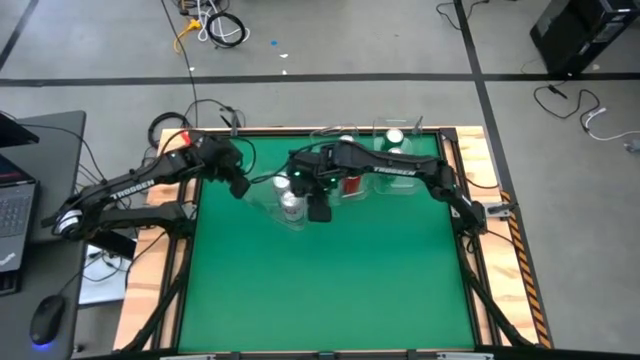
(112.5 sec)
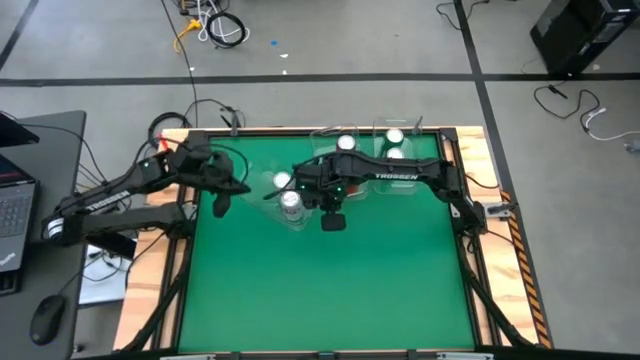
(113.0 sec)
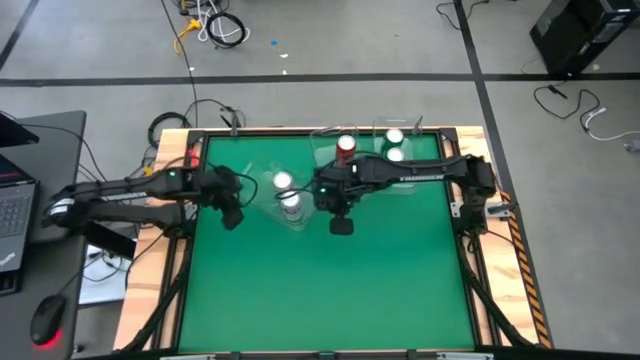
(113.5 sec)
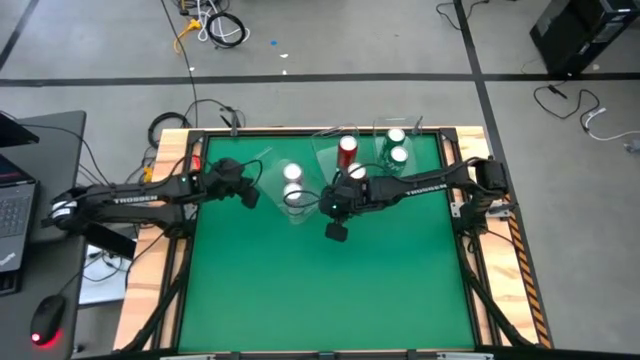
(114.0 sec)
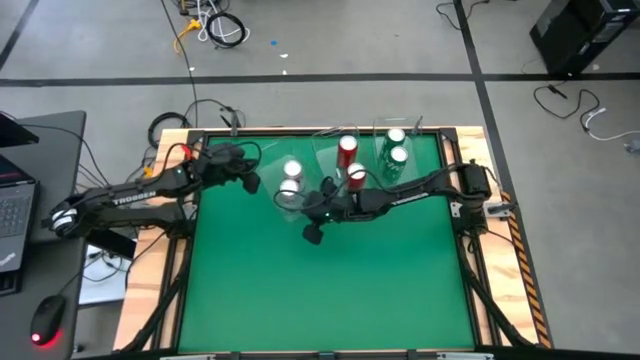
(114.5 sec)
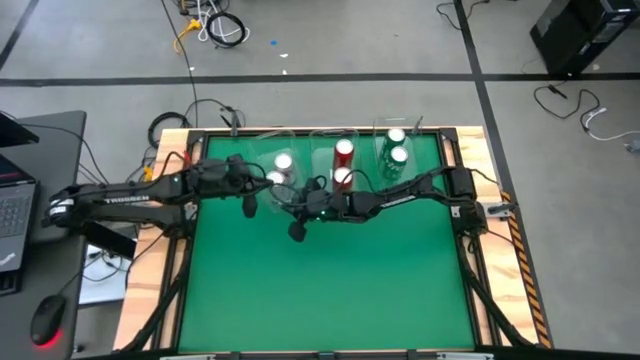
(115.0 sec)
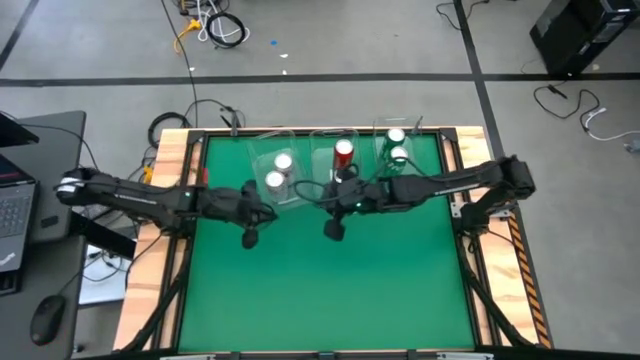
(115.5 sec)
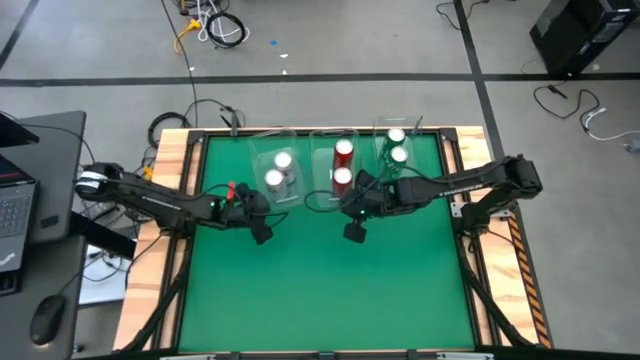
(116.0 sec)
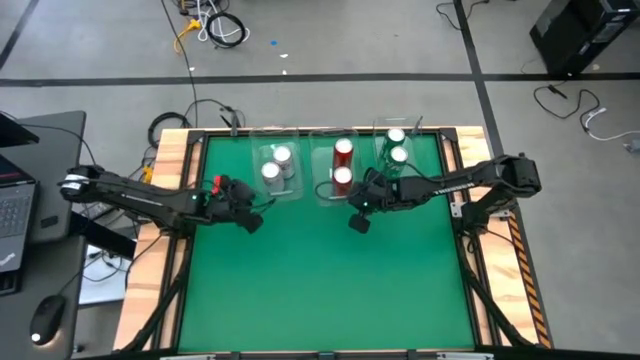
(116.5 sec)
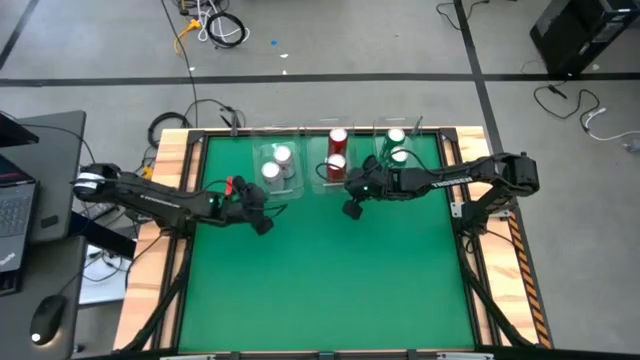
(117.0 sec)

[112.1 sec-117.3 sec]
Task: Sort soda cans
Adjust the transparent bins

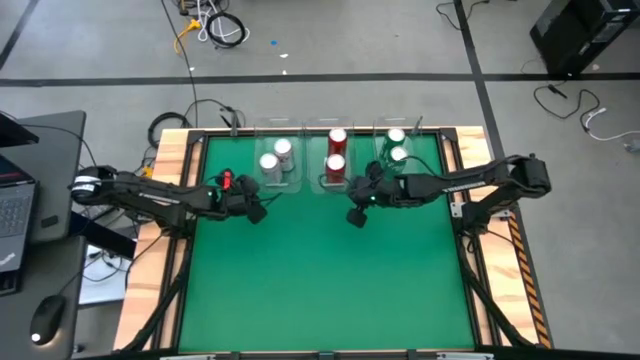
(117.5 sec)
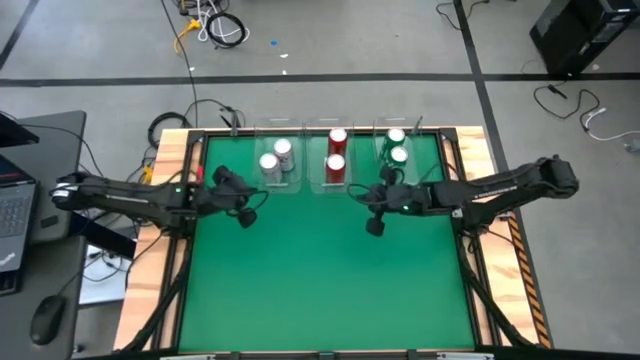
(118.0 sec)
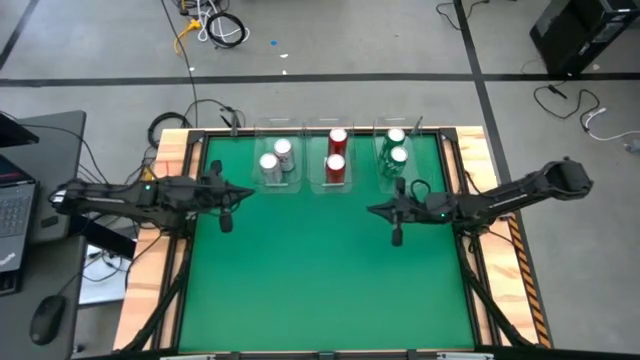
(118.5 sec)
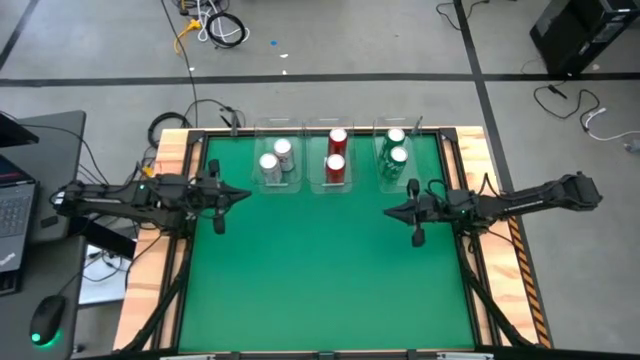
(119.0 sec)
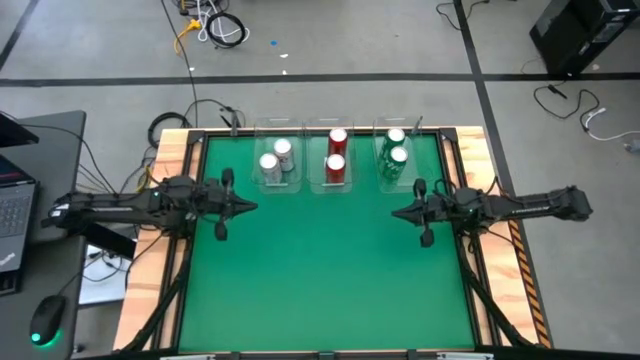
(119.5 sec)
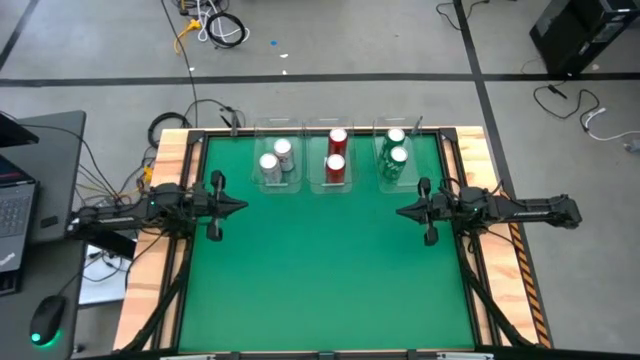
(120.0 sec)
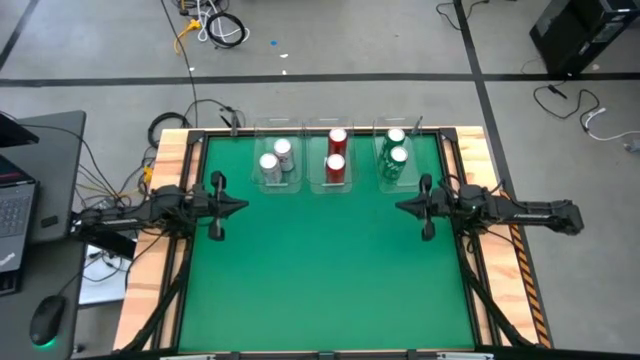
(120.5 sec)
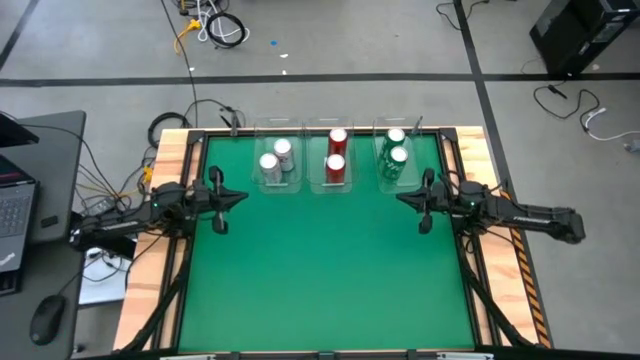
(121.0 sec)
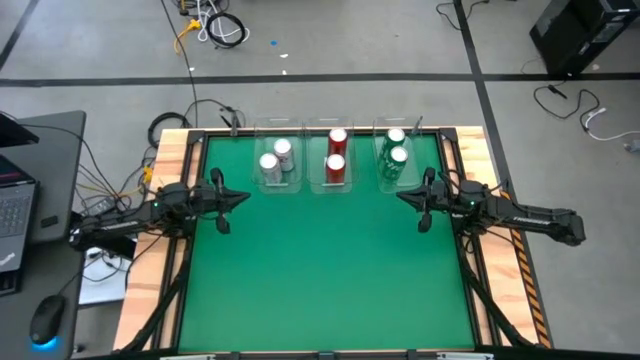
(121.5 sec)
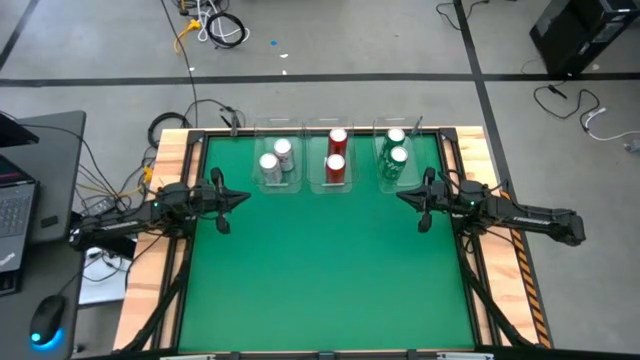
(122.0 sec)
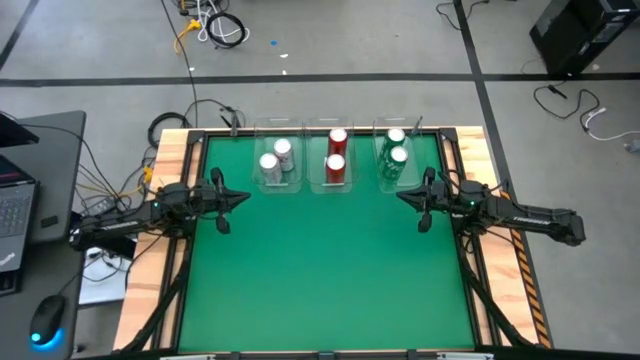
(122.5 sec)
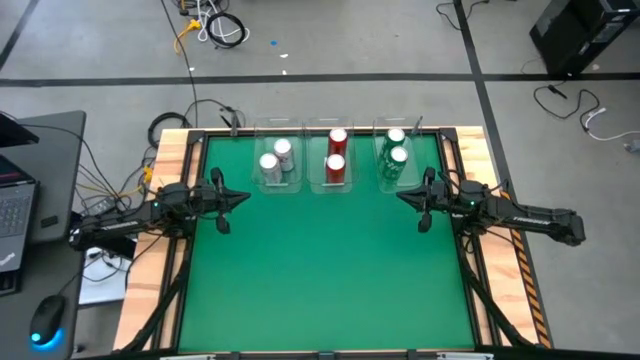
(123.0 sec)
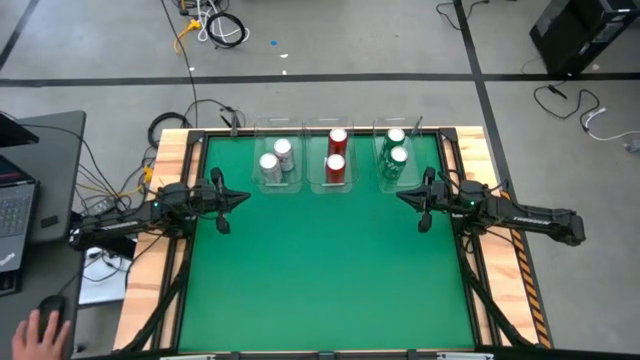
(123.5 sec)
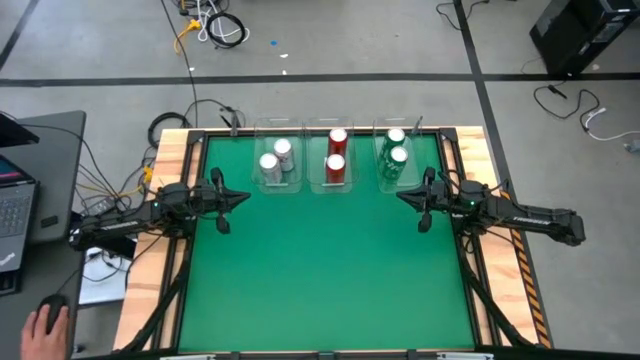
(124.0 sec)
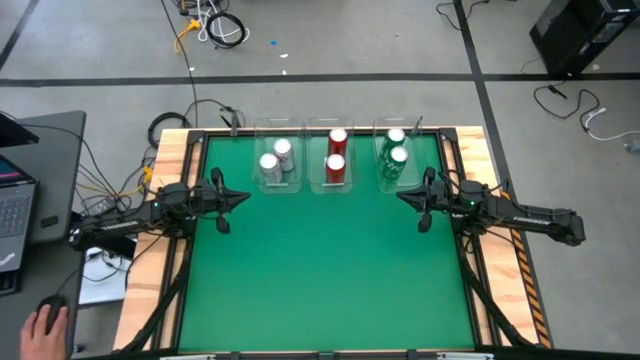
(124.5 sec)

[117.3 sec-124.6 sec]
Return to Home Position

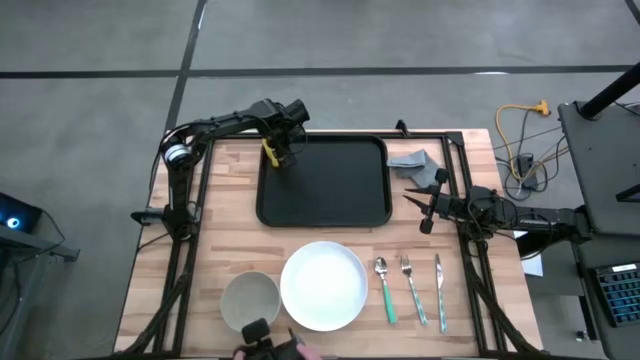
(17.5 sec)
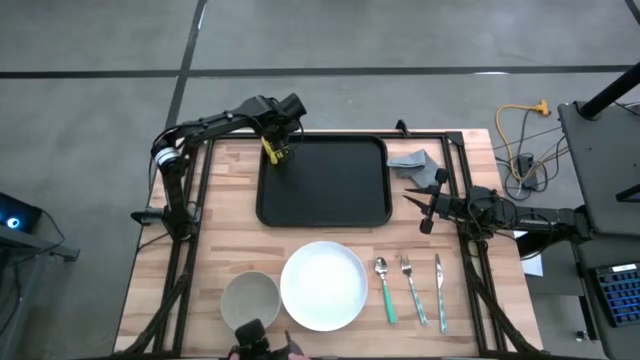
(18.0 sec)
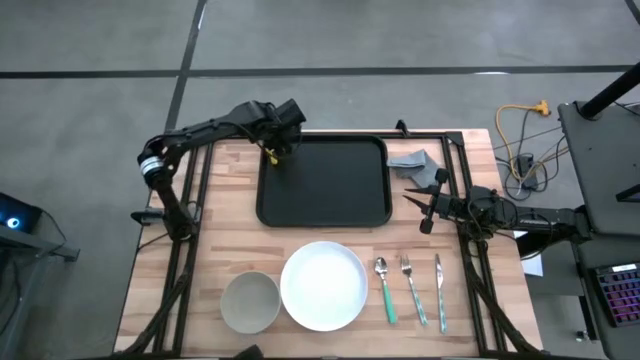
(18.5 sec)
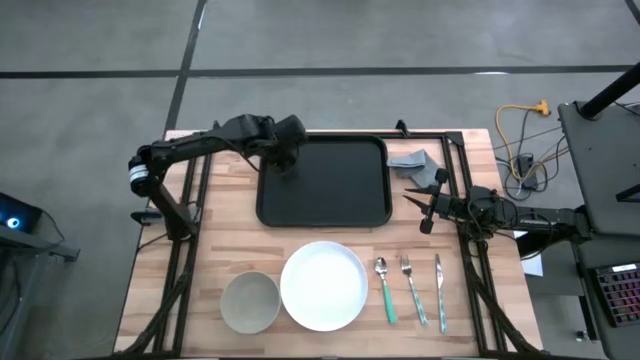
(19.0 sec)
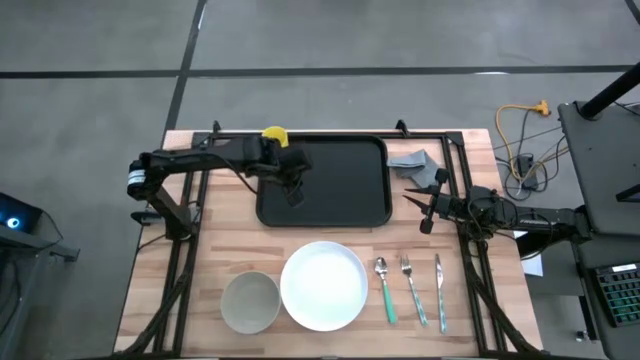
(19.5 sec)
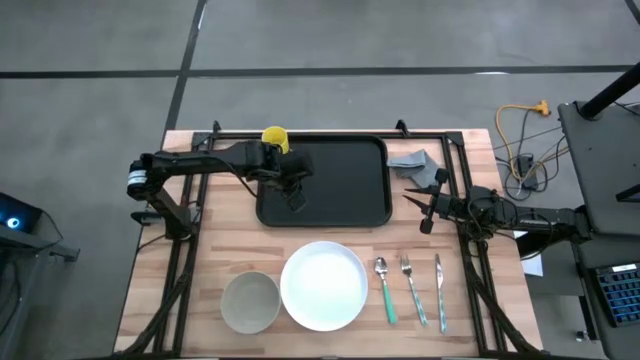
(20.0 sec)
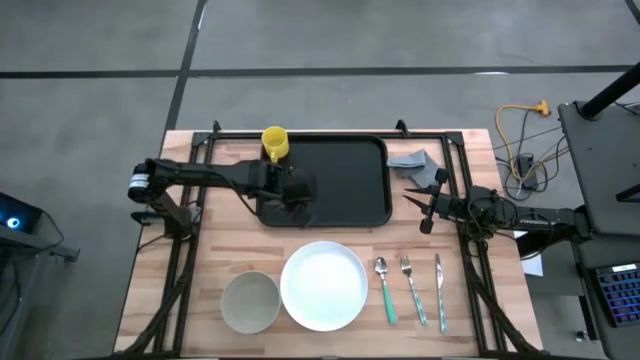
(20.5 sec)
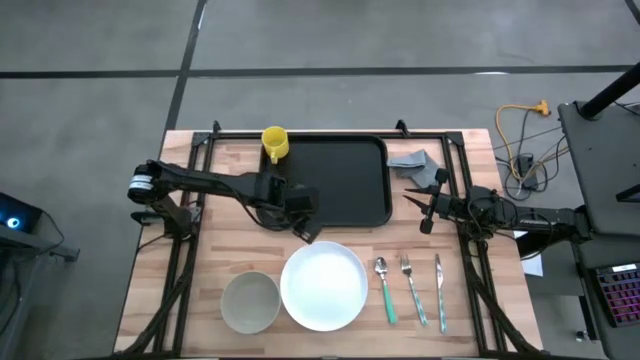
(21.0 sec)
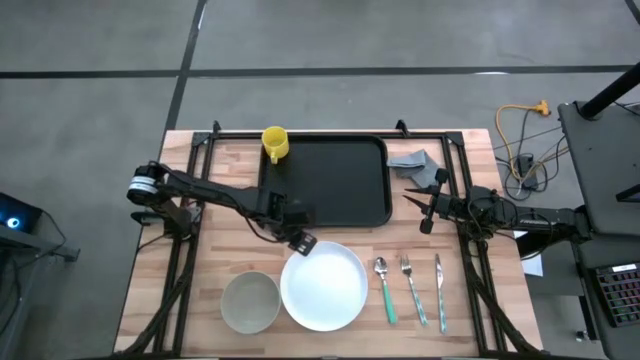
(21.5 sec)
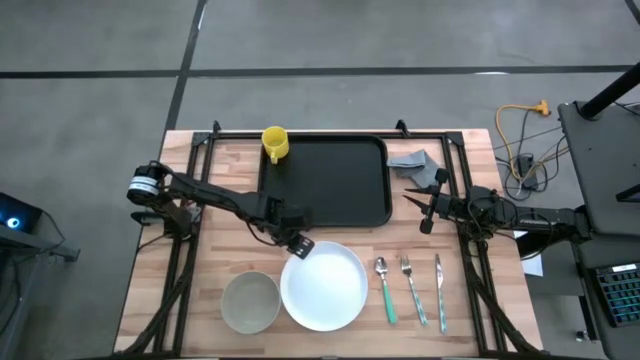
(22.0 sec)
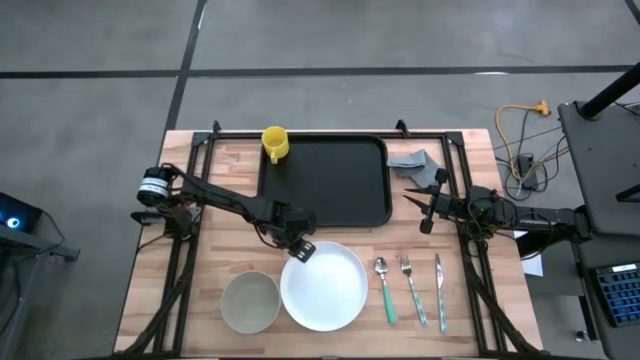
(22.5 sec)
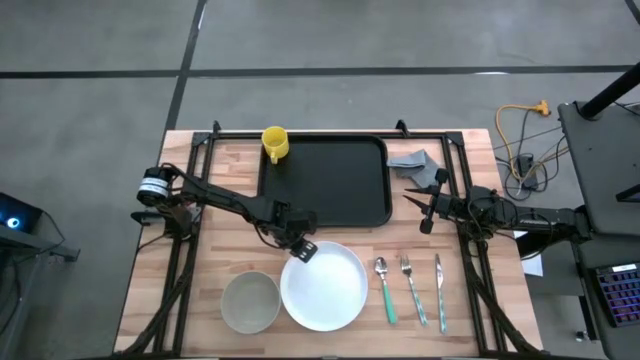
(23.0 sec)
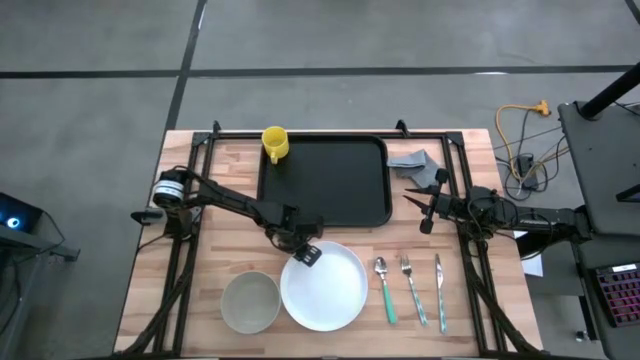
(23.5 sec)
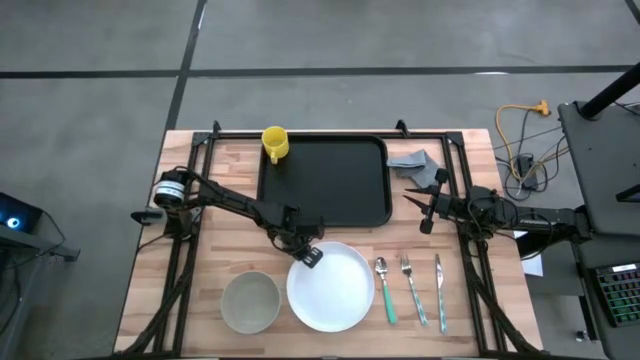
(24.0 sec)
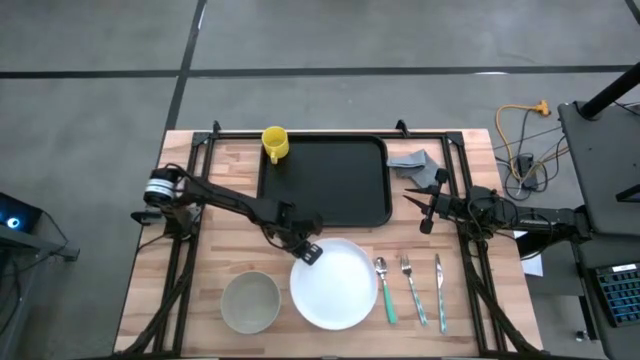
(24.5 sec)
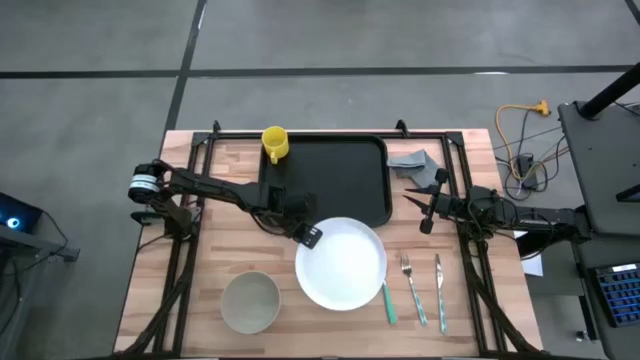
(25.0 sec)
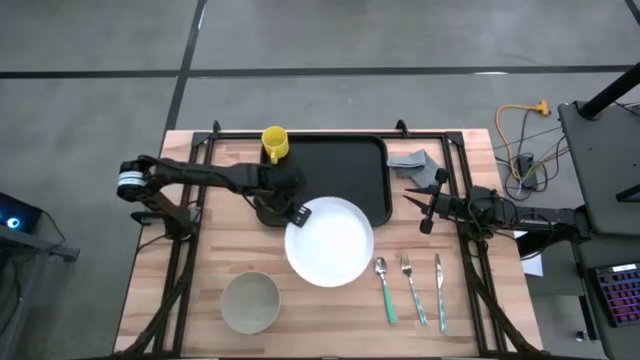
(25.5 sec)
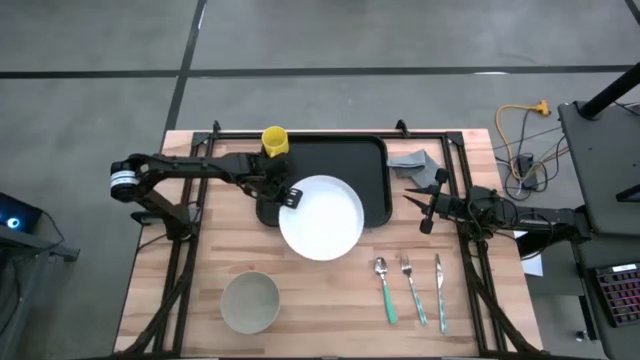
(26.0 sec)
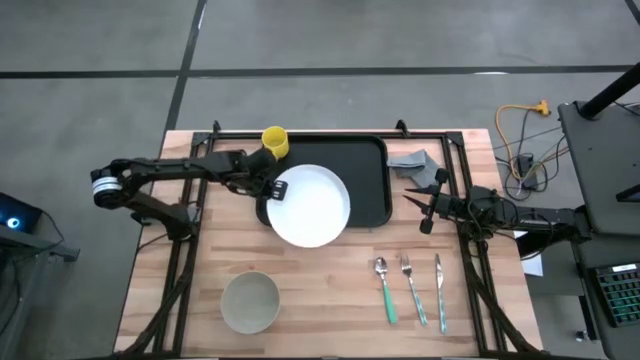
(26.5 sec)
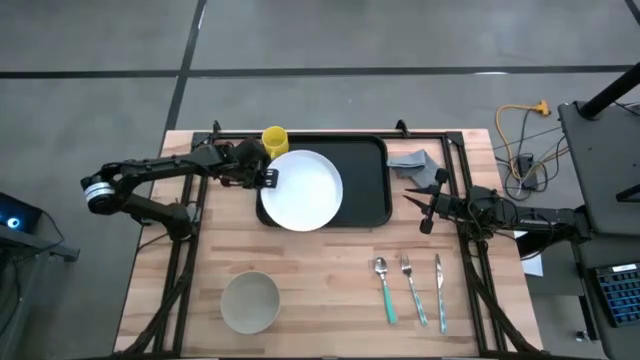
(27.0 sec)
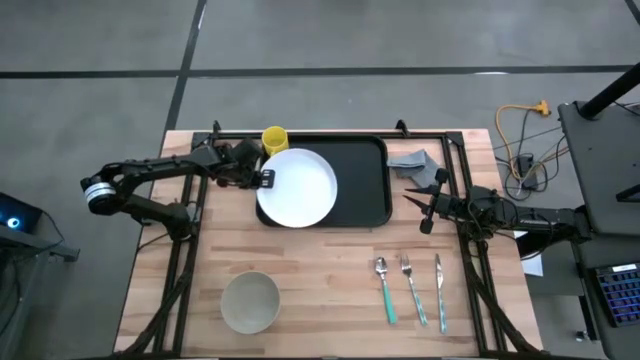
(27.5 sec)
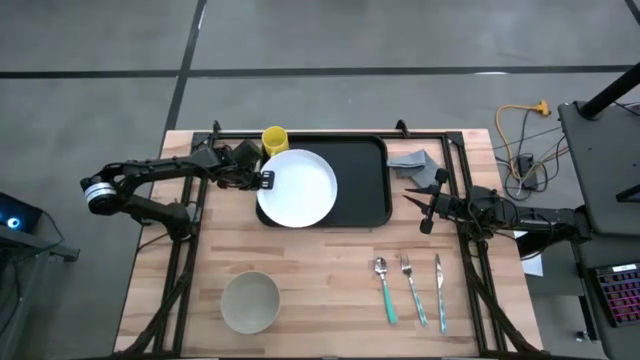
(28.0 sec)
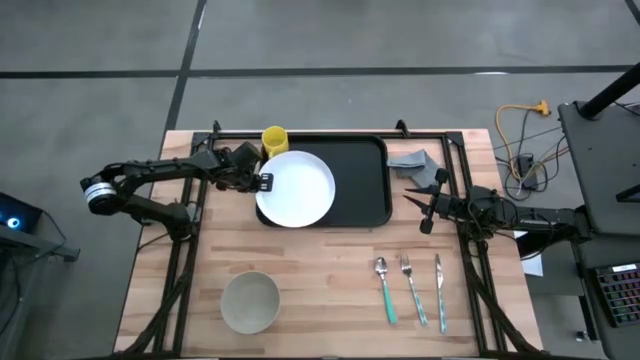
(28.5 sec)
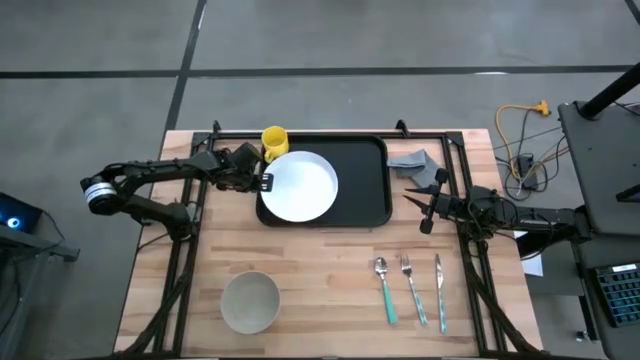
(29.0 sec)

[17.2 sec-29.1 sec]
Task: Set up tray
Put the white plate on the black serving tray below the yellow mug
